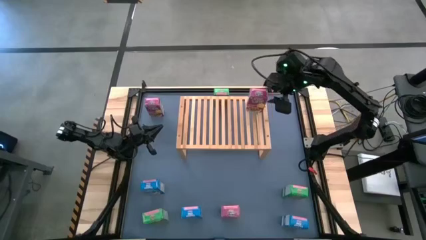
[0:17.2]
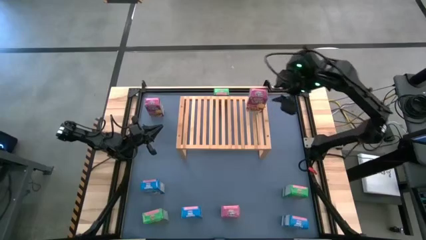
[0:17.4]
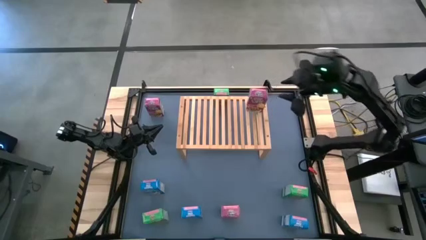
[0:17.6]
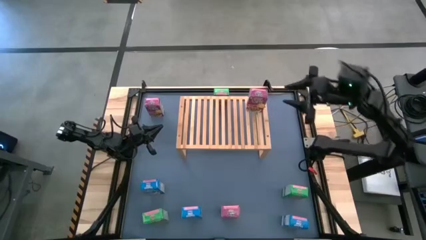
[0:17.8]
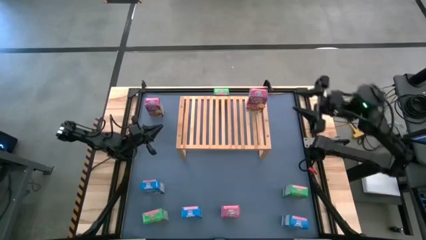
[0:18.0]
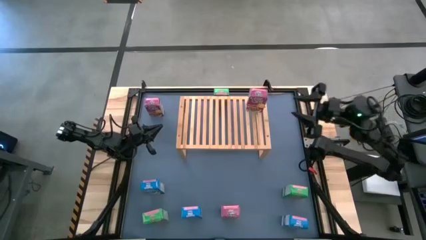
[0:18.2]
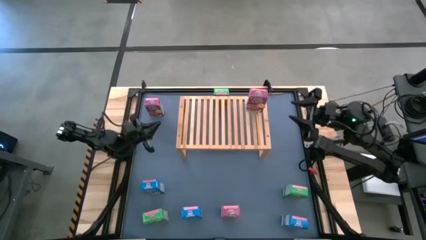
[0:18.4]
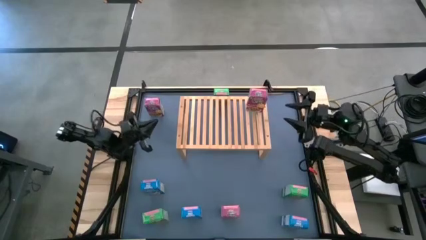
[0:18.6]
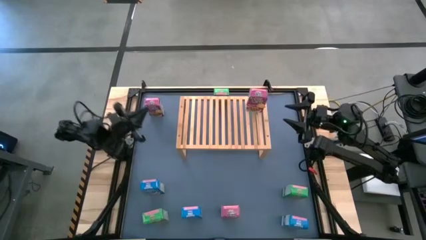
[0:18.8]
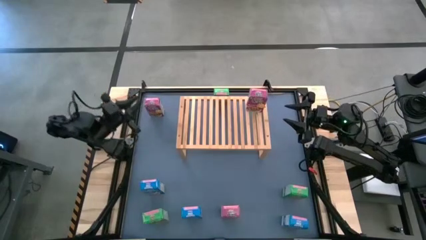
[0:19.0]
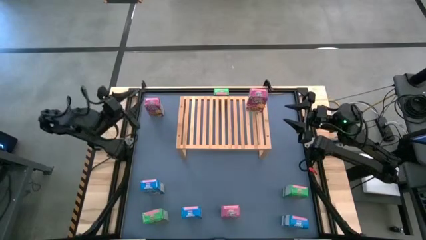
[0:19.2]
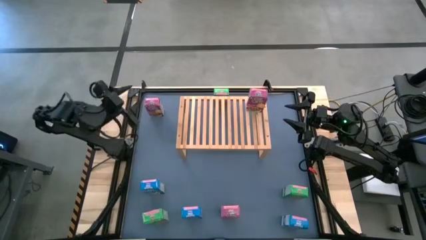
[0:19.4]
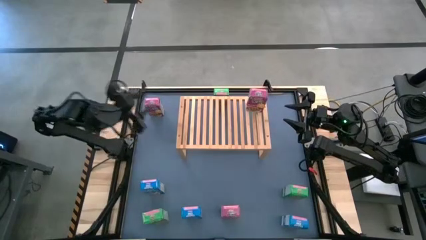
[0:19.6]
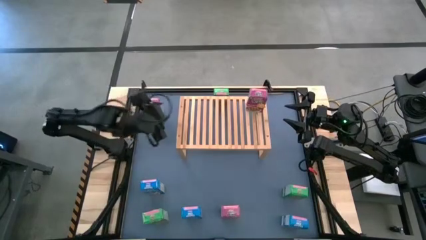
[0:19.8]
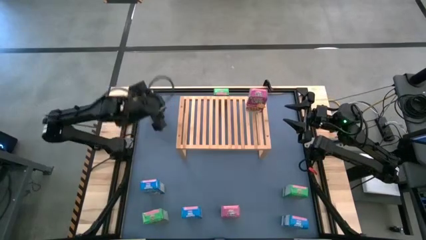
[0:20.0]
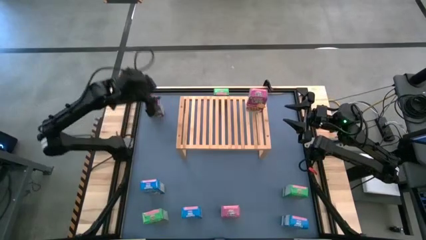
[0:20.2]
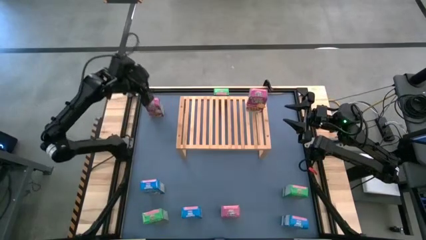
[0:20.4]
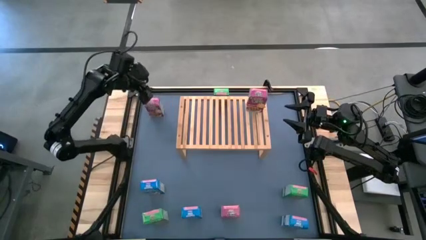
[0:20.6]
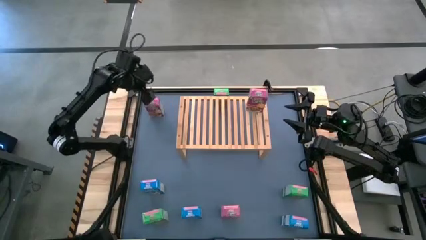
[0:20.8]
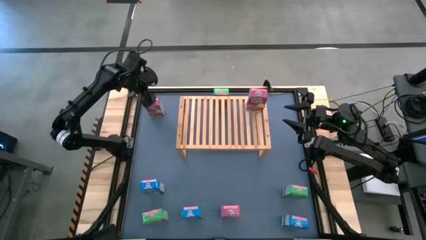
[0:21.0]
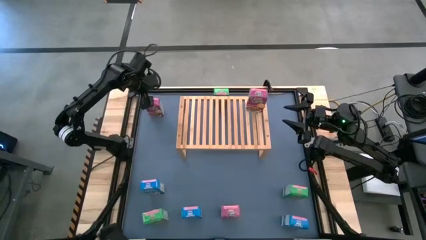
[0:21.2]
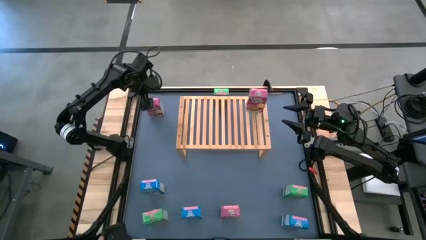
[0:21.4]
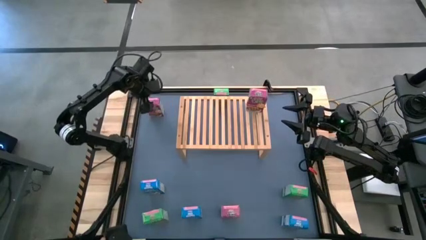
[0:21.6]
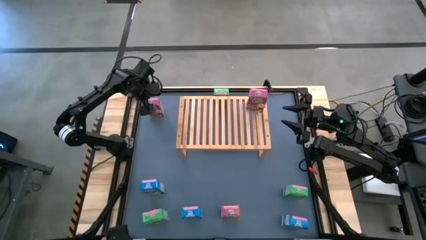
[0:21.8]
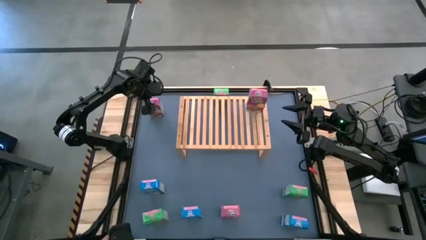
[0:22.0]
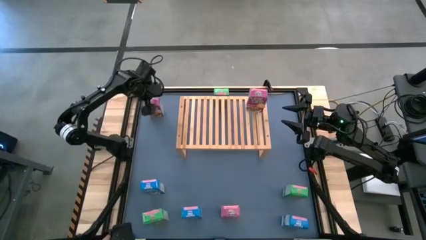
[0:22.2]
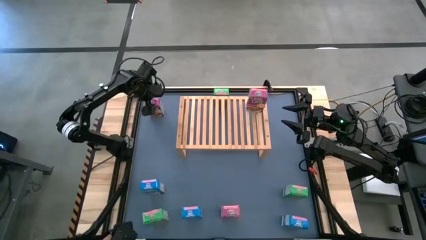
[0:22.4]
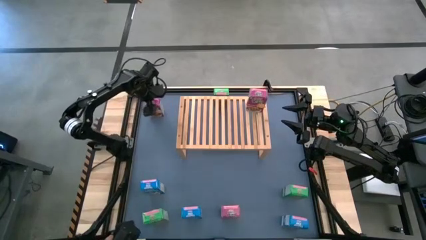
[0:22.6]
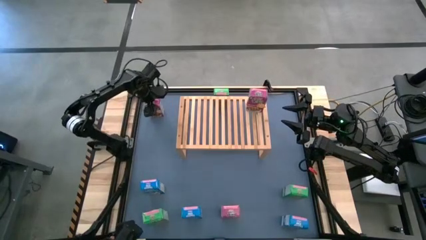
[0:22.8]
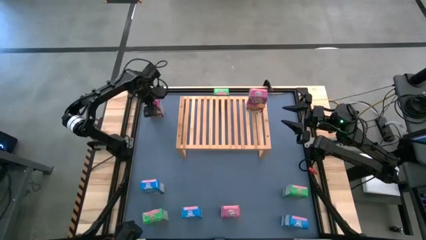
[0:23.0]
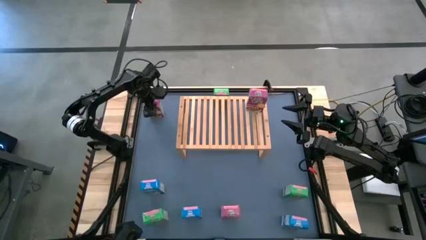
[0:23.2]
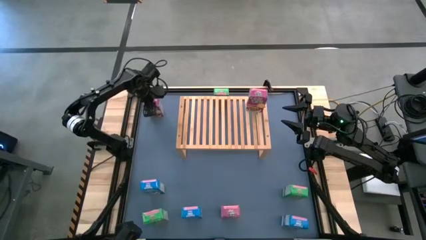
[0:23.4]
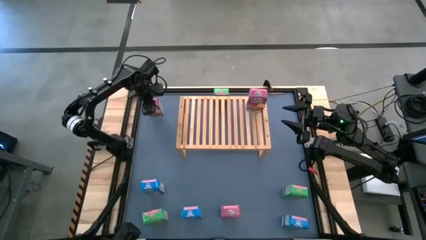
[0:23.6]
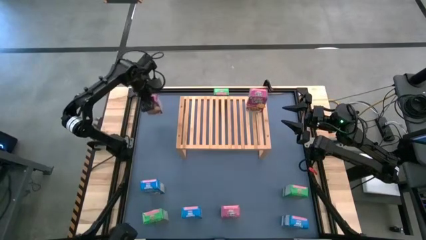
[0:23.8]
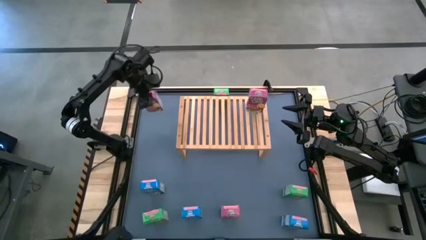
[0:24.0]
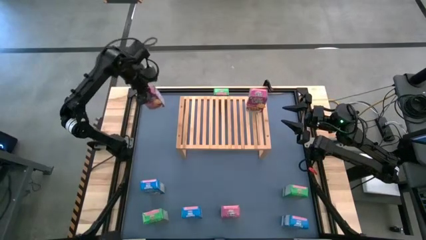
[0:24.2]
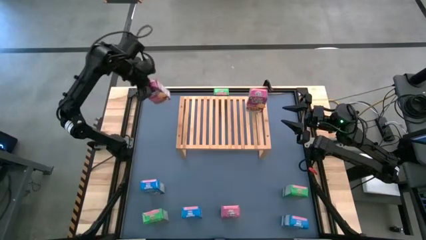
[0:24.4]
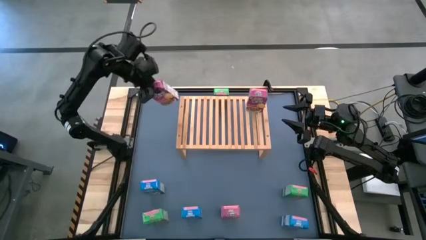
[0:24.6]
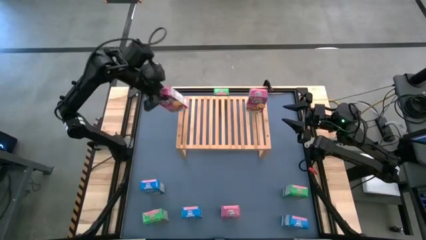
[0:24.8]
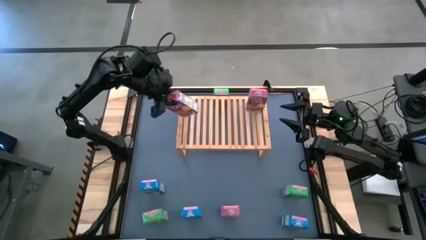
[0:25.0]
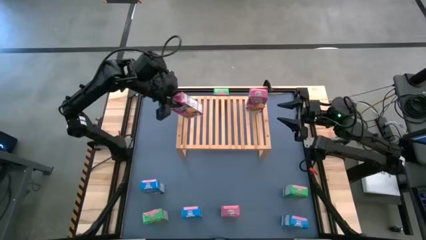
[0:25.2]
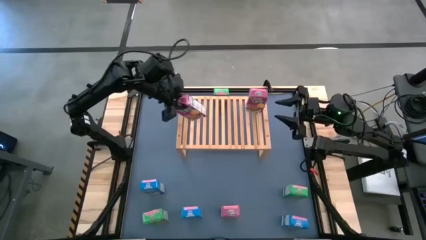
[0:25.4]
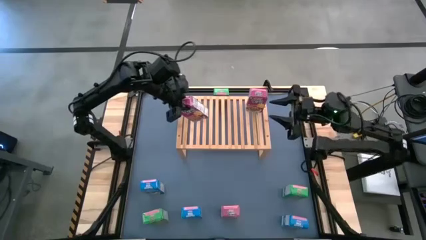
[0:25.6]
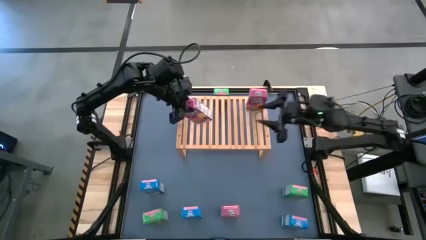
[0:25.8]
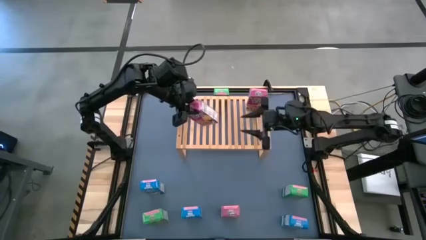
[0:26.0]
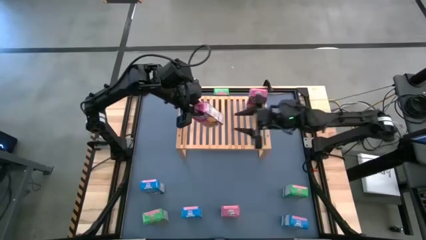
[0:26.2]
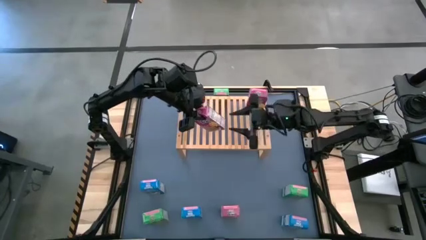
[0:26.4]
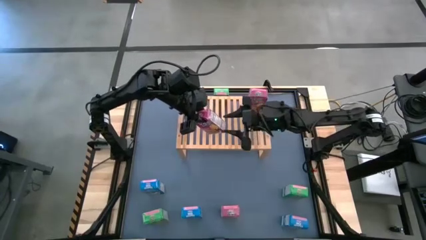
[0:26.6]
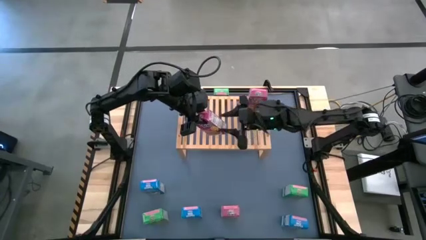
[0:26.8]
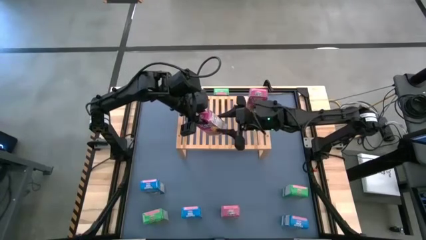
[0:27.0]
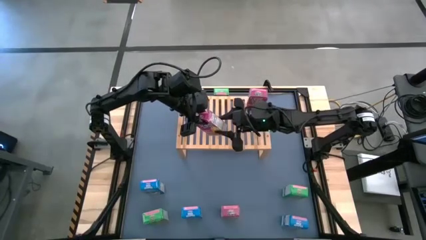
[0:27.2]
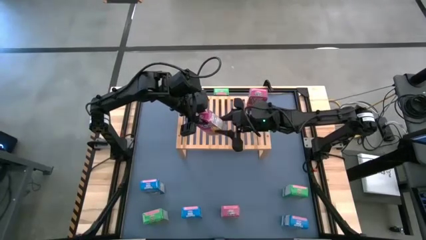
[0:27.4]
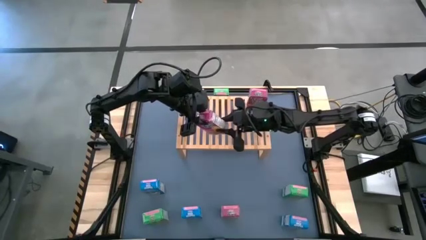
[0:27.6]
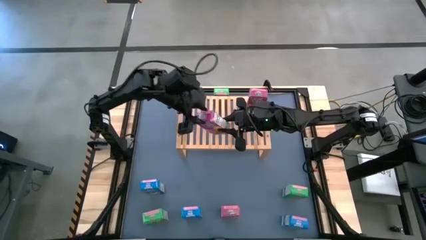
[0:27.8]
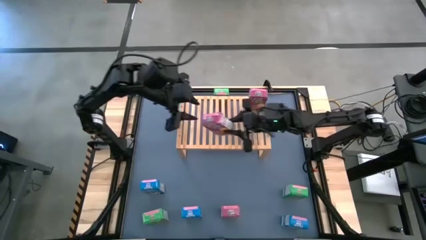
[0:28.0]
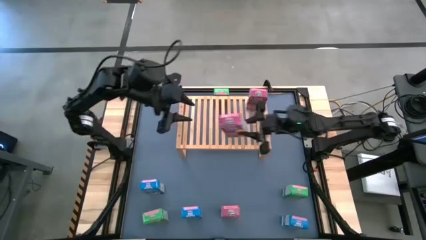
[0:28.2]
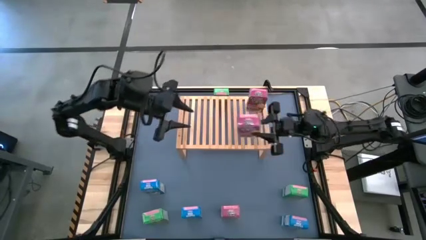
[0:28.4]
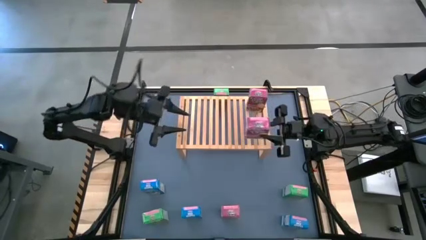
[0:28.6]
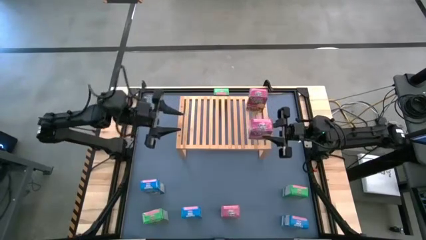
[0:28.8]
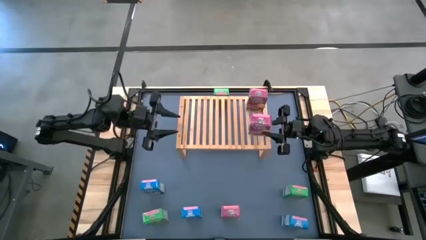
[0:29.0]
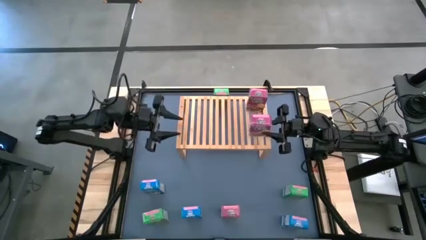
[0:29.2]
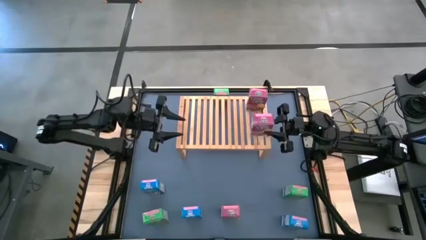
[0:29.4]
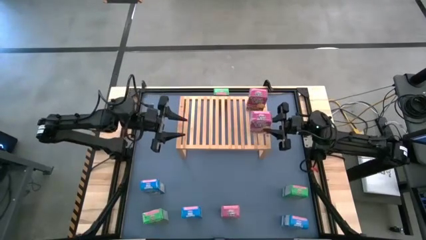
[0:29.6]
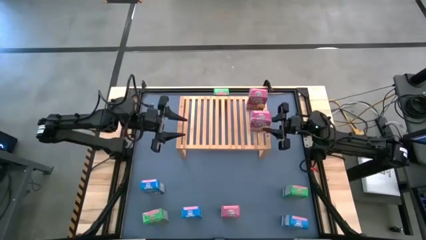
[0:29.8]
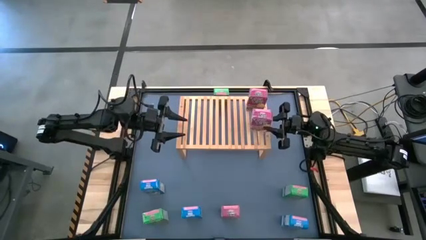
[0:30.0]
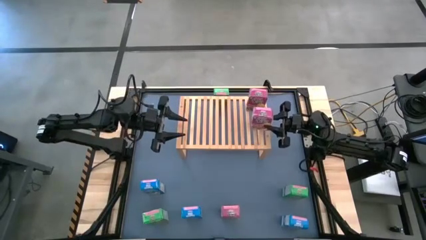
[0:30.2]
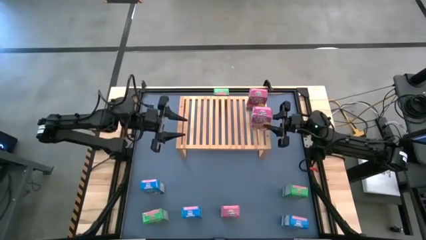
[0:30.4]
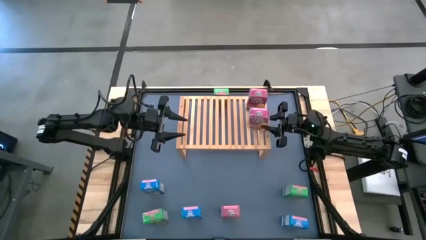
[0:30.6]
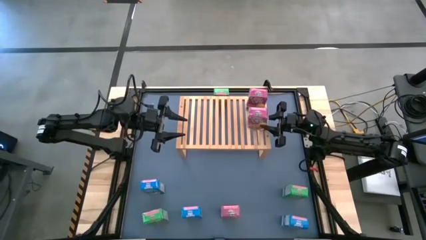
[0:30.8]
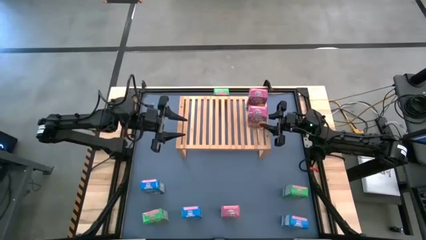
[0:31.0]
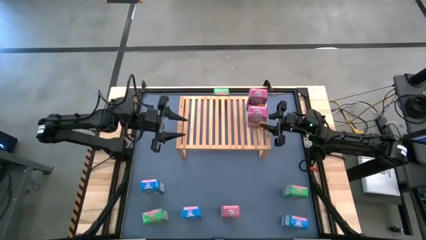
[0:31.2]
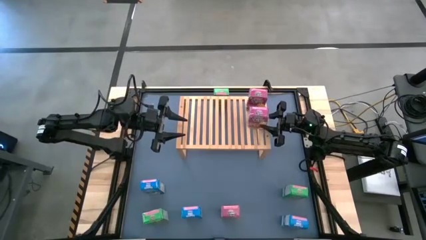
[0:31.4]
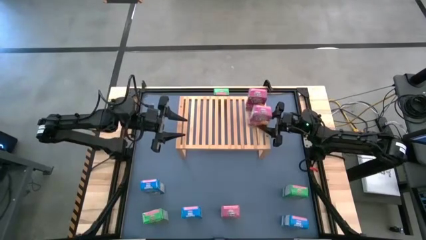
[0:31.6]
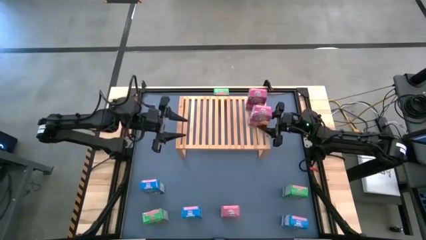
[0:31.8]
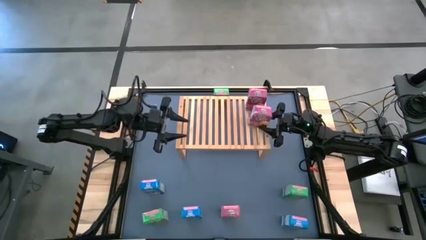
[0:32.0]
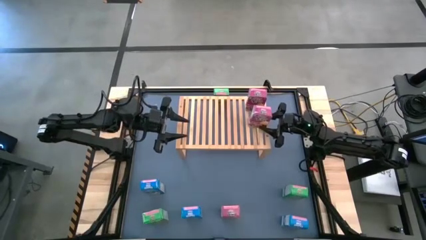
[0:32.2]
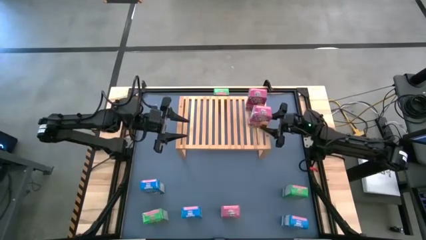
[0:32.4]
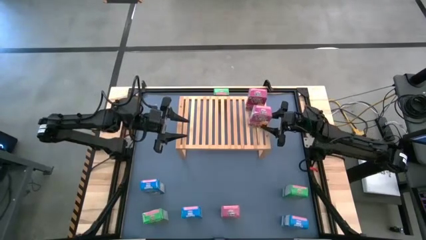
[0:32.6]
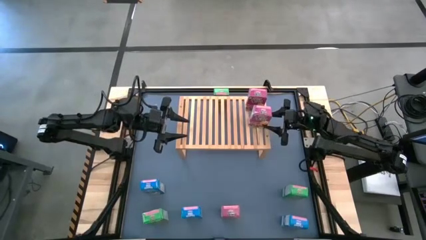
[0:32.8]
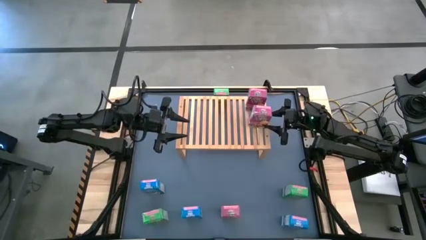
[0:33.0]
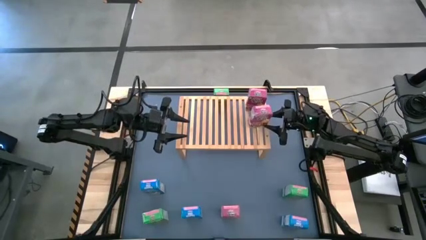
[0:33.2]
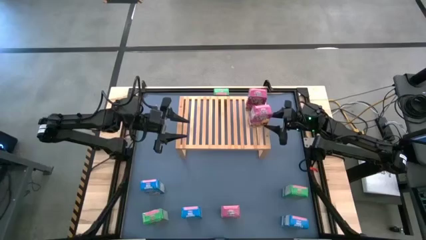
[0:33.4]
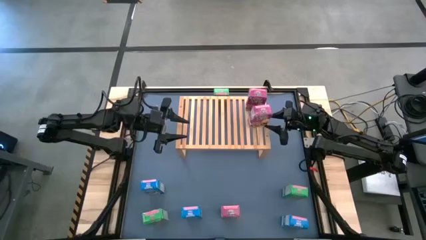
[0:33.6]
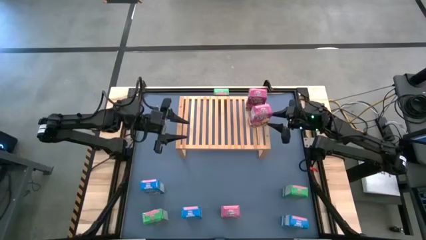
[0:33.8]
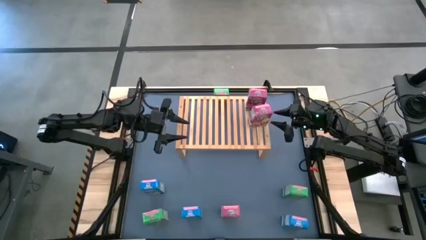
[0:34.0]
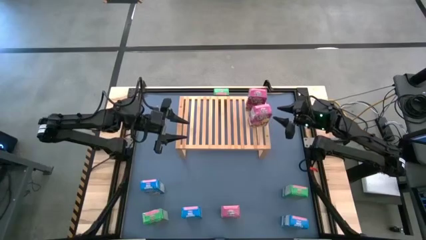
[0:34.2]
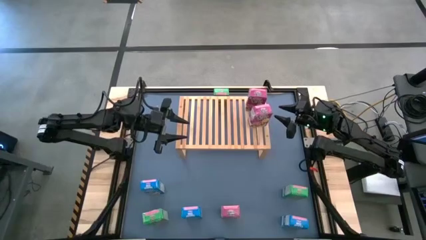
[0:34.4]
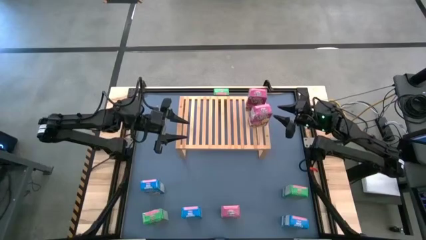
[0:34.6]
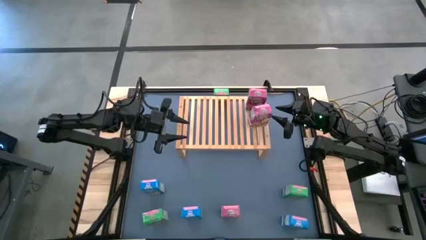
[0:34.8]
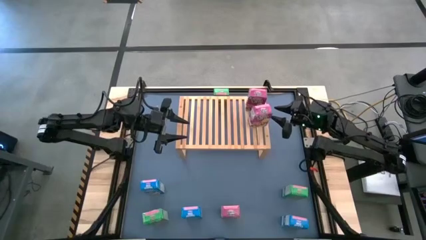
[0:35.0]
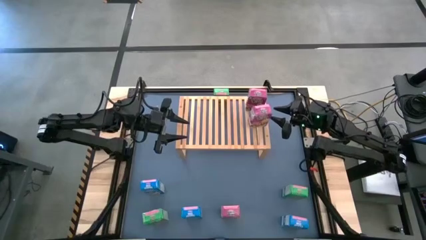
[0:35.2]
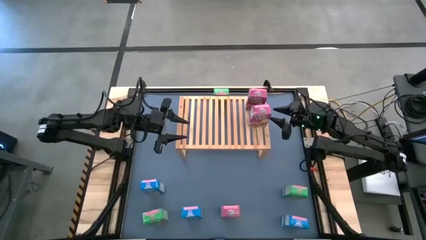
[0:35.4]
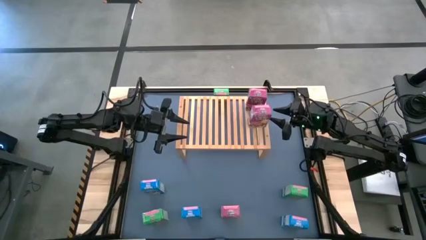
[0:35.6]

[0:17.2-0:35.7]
Task: Stack cereal on shelf
Put the top pink cereal box on the shelf
